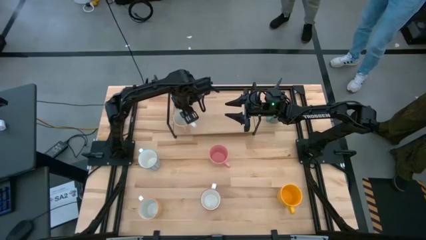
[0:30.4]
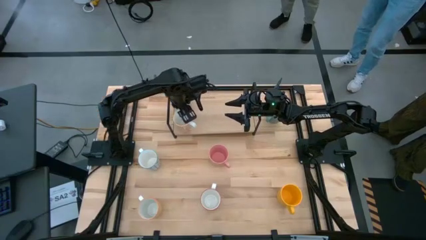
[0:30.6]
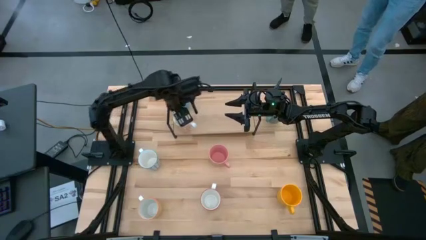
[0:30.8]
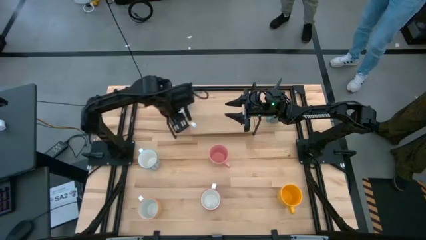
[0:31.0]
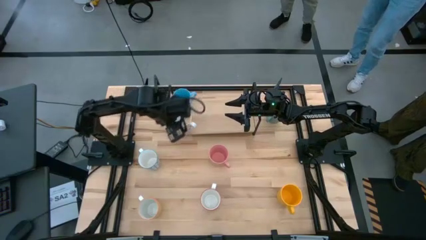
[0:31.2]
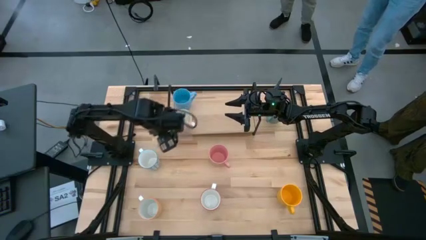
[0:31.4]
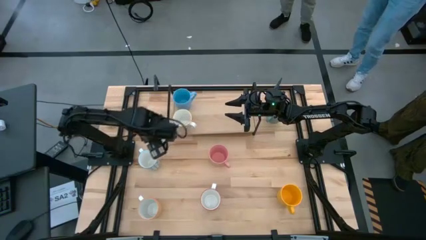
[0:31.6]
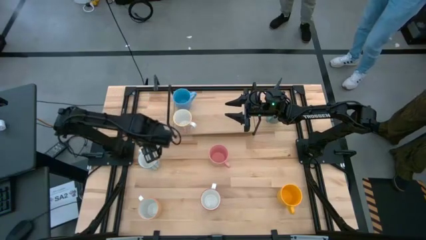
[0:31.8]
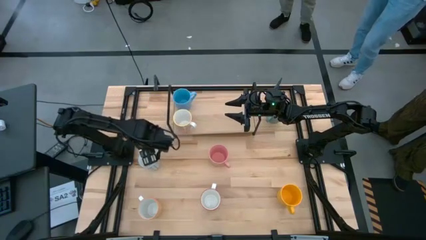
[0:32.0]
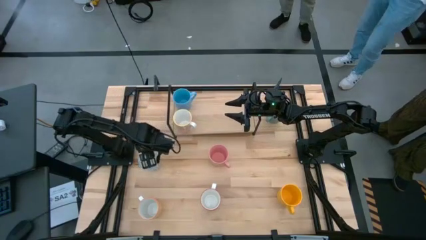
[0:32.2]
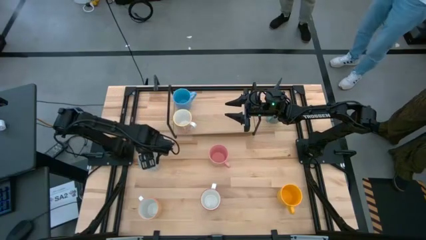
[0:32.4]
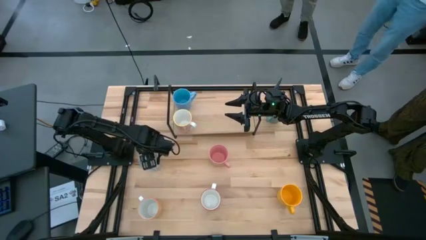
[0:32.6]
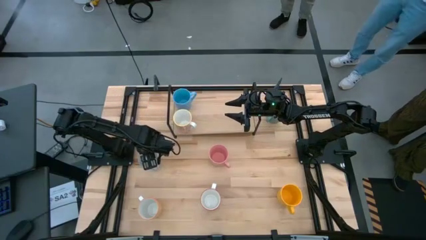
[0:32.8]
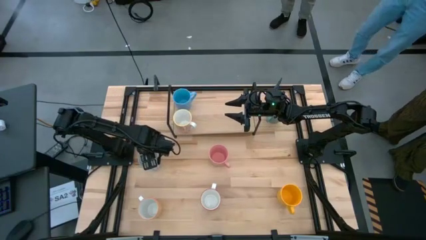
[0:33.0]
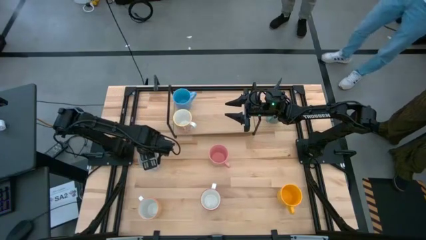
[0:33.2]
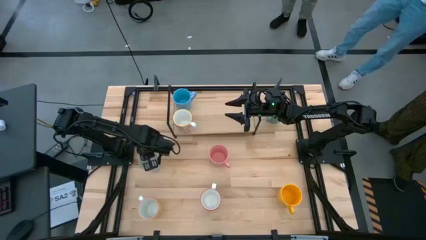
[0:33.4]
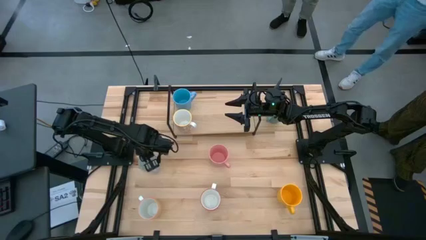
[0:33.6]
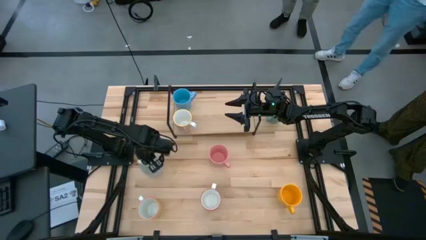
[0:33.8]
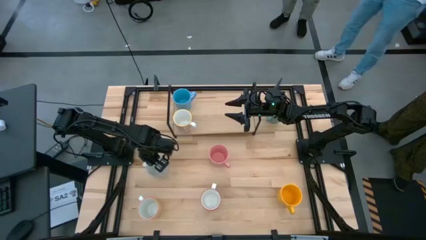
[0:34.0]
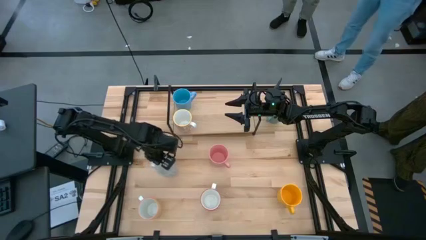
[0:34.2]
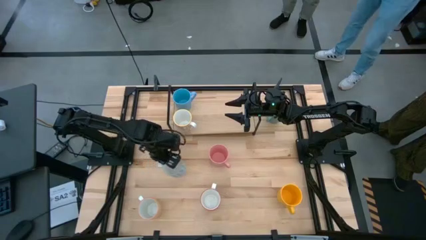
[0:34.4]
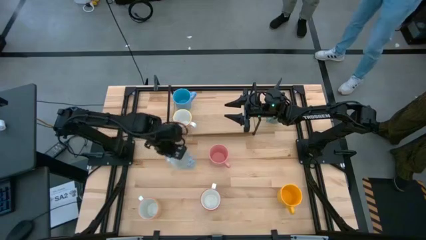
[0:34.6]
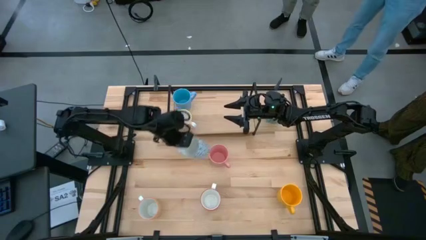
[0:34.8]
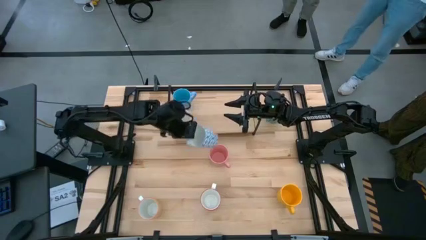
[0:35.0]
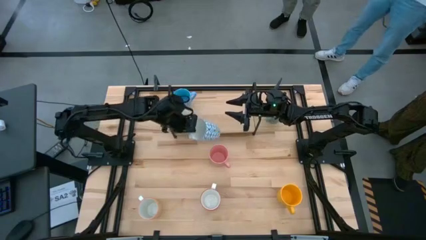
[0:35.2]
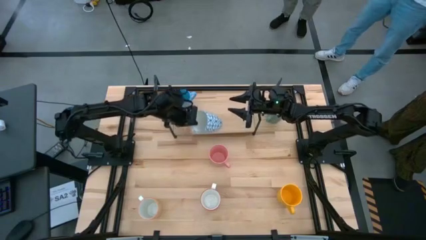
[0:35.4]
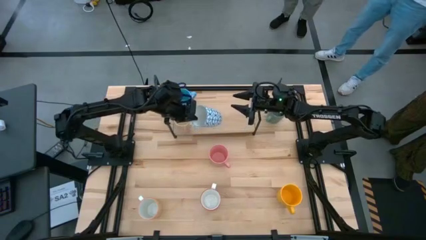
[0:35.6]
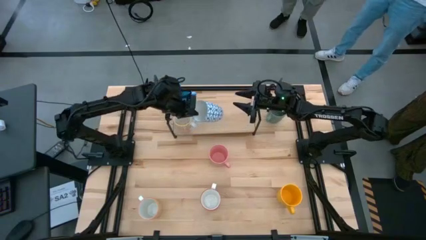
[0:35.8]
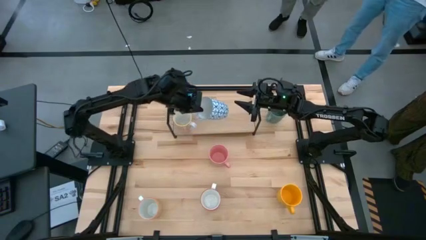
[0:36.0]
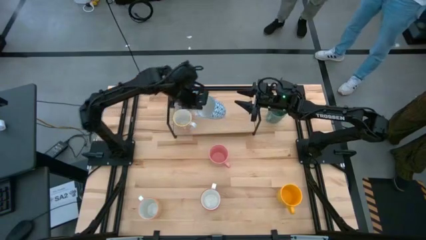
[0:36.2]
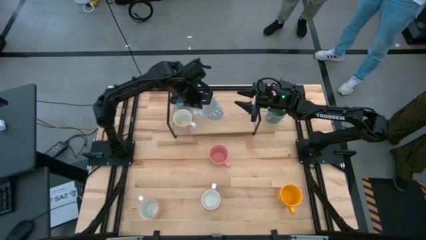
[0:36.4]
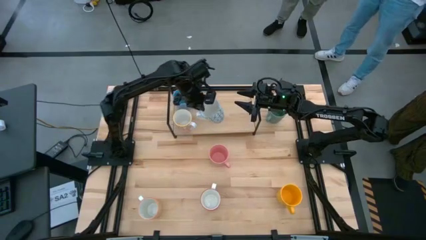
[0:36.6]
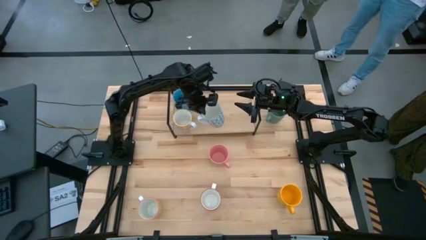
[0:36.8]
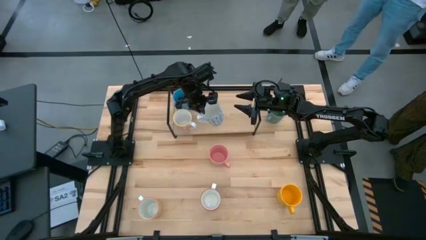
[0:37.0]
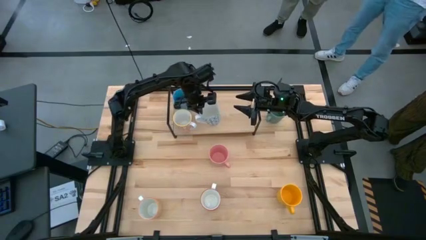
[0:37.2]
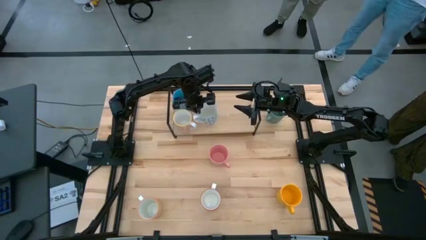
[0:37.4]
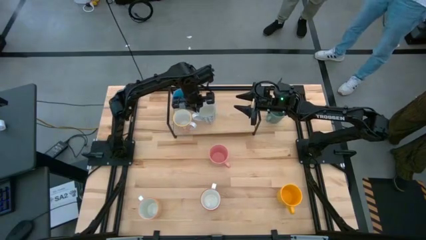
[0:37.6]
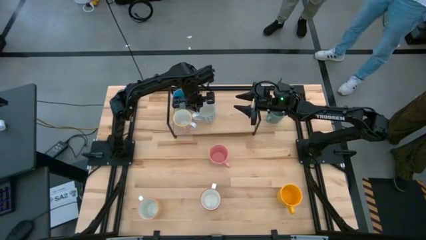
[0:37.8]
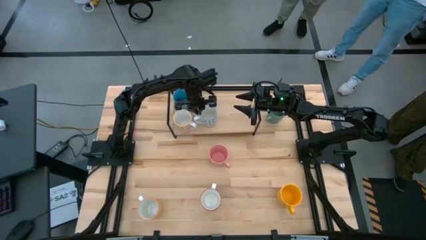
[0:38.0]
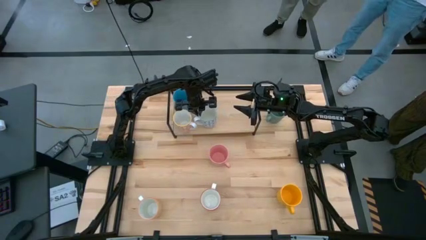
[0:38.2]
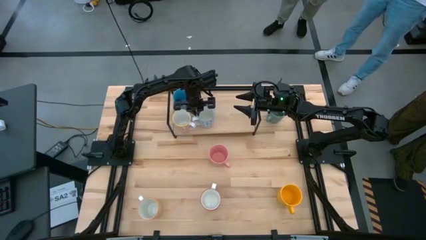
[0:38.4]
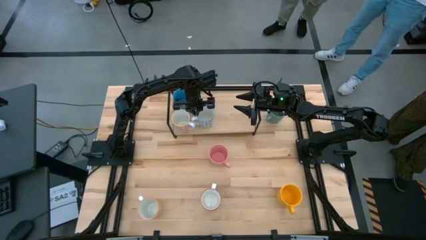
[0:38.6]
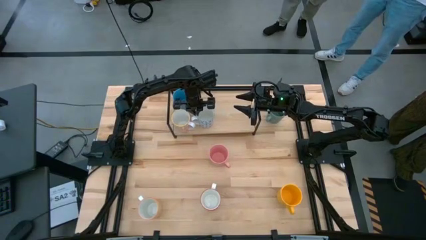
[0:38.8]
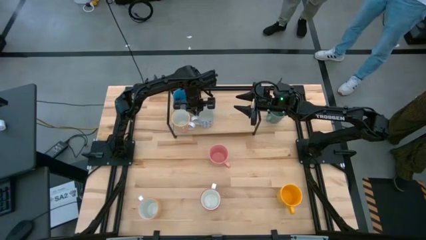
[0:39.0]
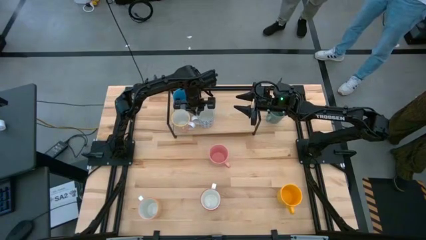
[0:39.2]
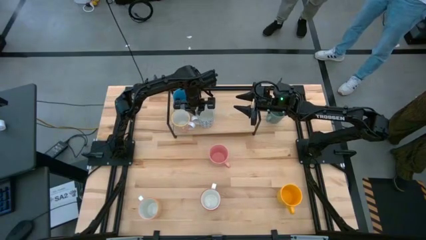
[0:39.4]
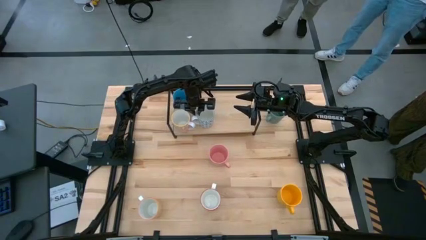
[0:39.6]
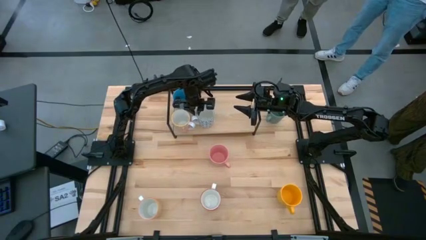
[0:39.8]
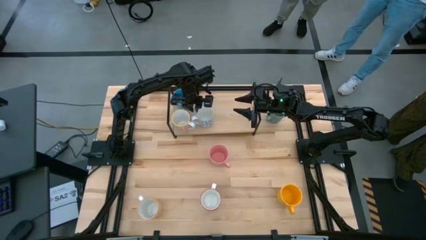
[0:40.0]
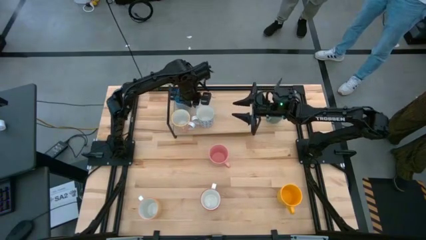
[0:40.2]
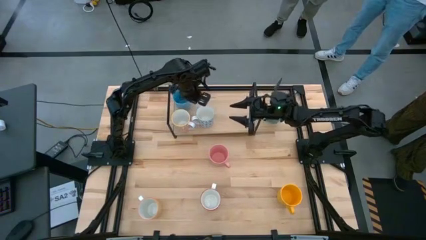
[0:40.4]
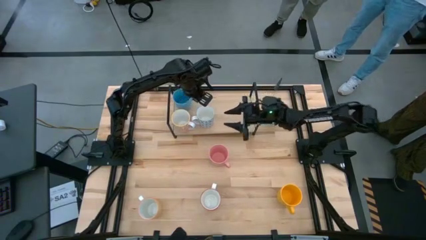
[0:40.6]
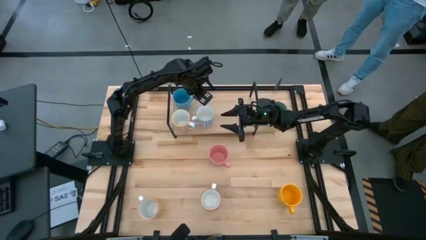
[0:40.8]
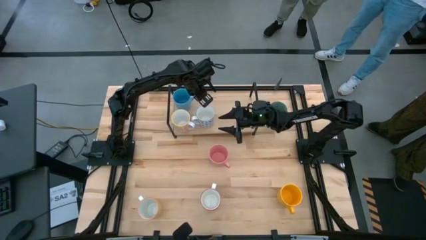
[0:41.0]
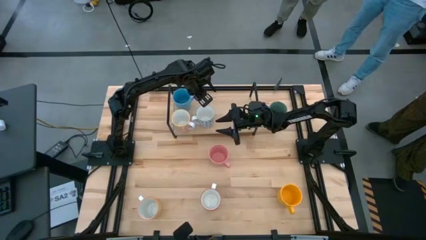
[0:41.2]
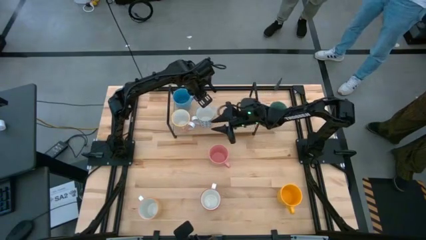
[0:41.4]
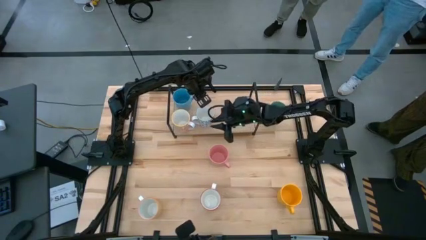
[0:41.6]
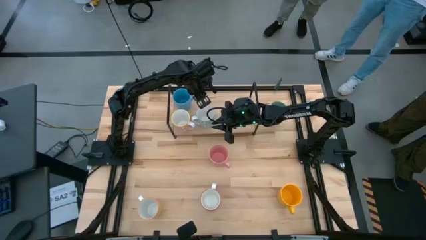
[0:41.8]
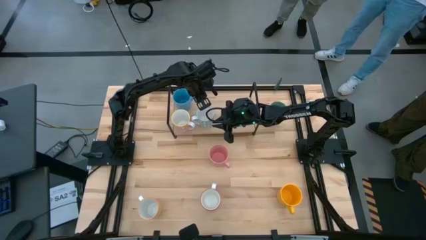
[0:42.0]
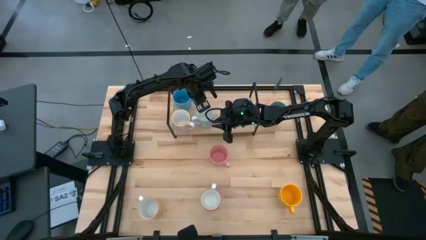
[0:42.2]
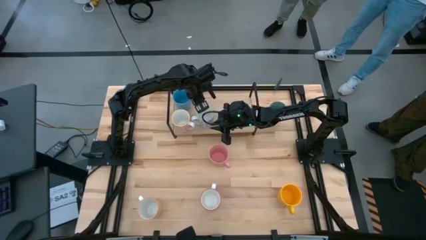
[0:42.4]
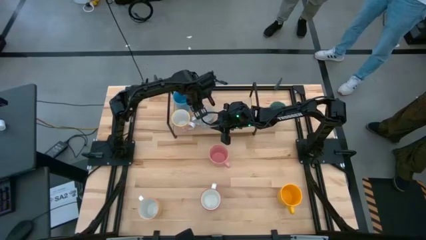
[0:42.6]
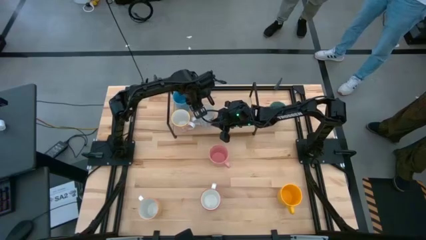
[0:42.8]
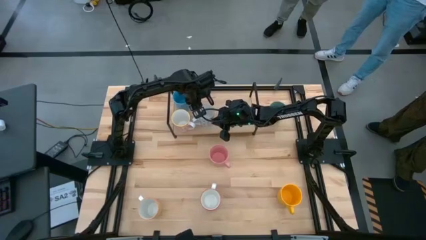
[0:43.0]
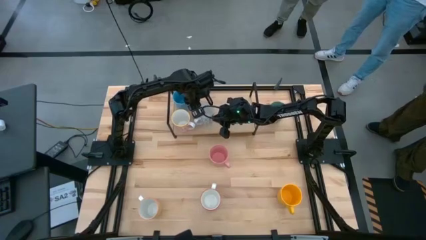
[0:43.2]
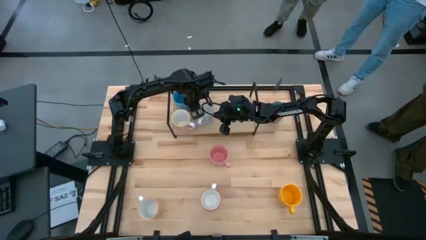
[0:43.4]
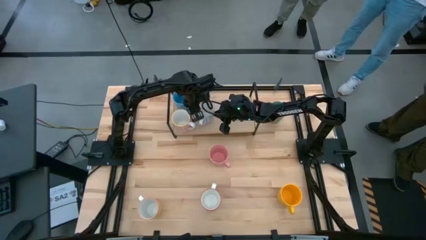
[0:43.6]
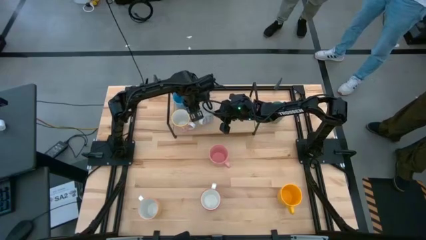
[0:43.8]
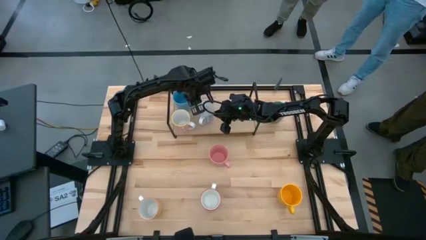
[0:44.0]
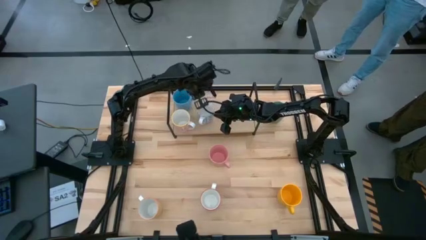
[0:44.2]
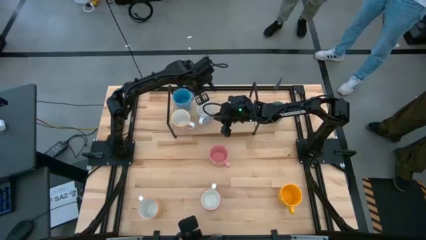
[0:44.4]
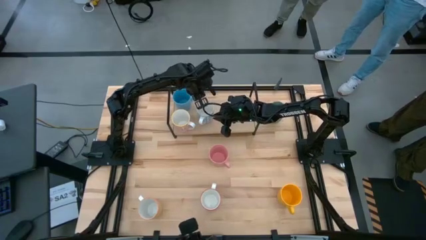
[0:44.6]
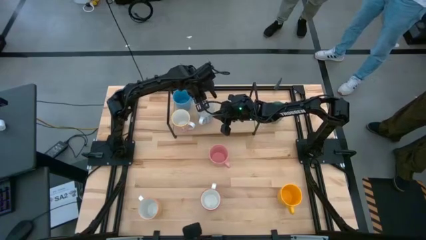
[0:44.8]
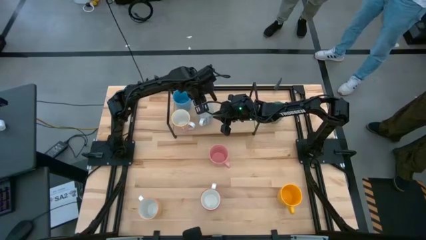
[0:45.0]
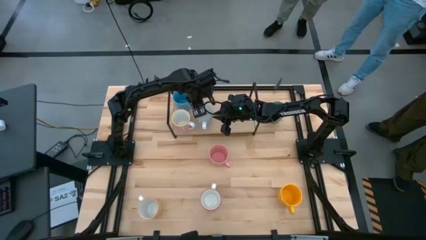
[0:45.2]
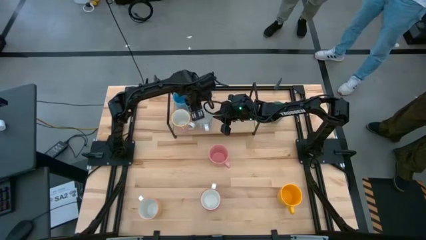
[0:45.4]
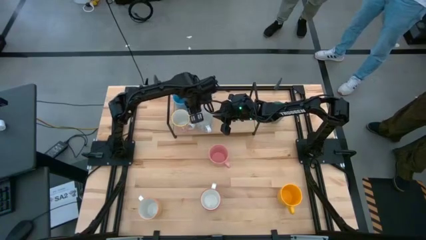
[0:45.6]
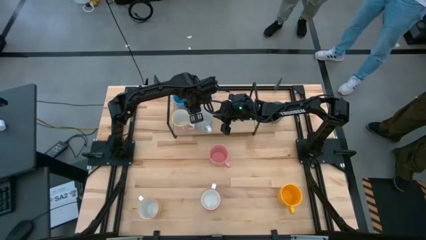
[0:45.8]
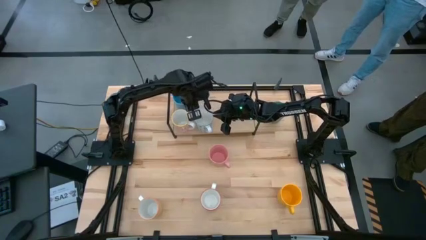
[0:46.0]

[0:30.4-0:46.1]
Task: Place coffee mugs
Put the blue patterned mug on the shelf
